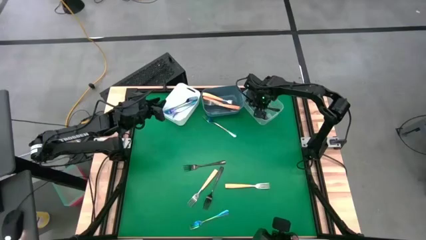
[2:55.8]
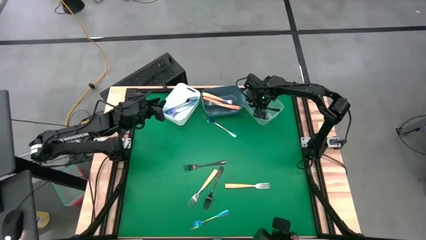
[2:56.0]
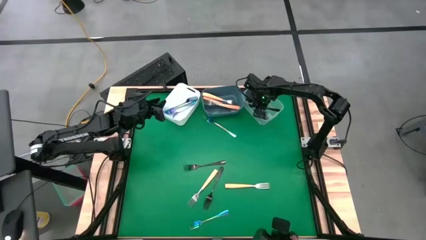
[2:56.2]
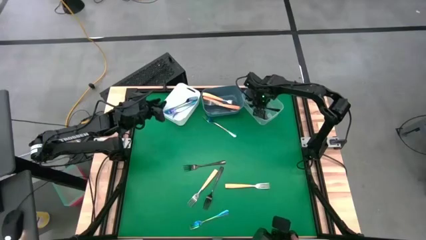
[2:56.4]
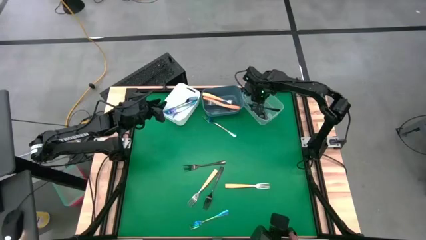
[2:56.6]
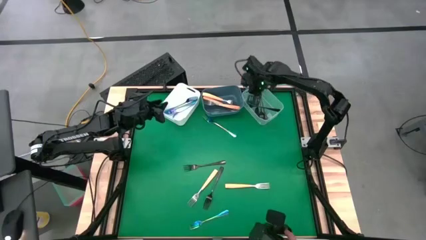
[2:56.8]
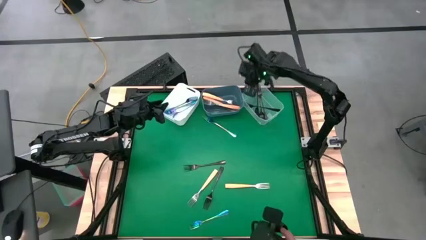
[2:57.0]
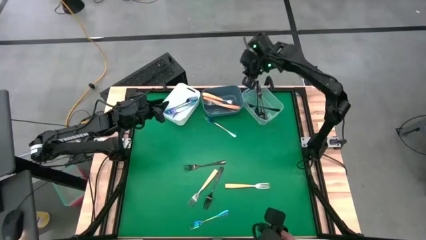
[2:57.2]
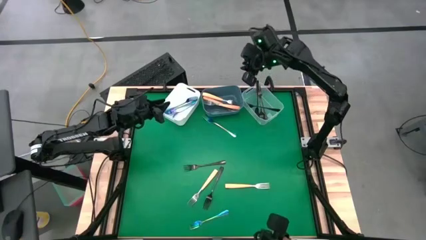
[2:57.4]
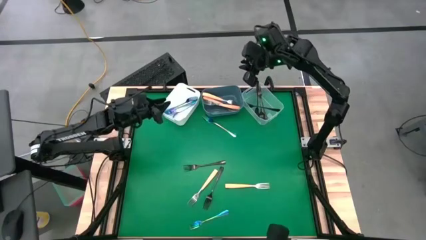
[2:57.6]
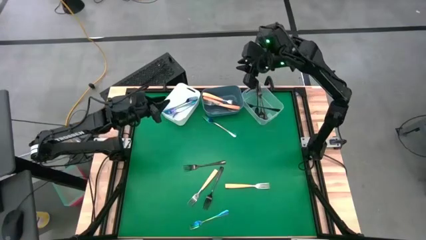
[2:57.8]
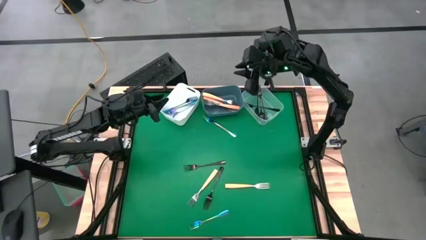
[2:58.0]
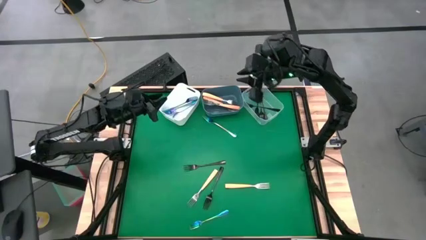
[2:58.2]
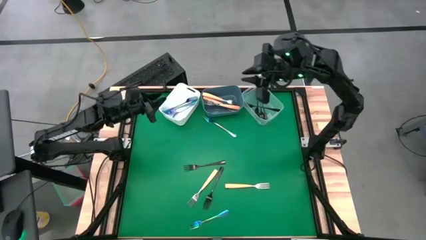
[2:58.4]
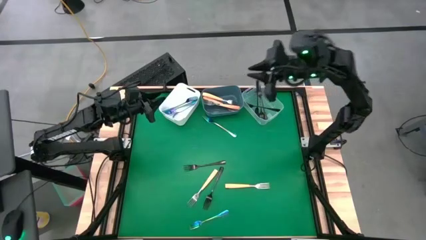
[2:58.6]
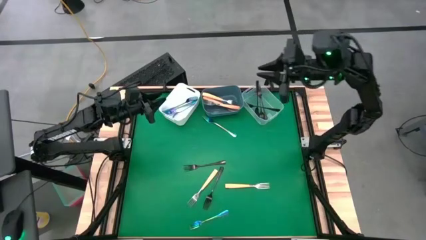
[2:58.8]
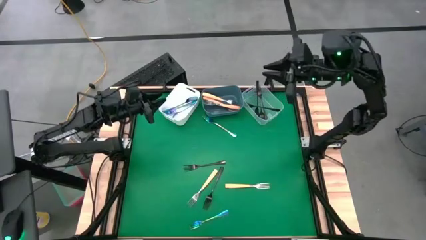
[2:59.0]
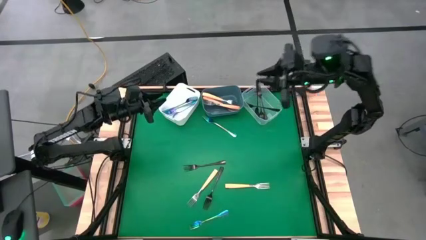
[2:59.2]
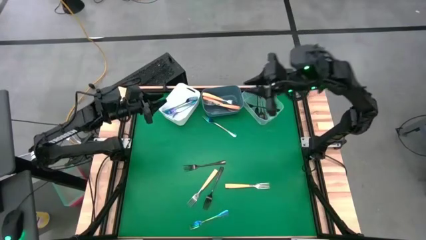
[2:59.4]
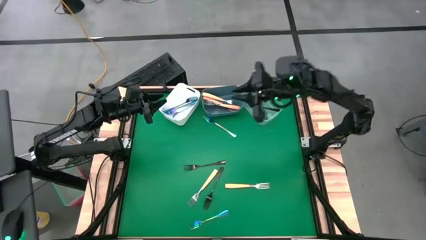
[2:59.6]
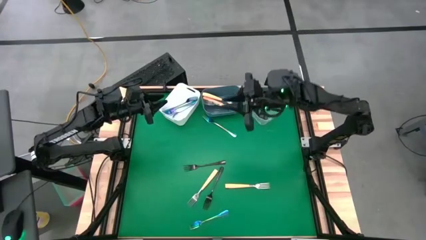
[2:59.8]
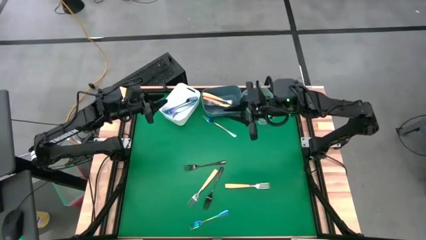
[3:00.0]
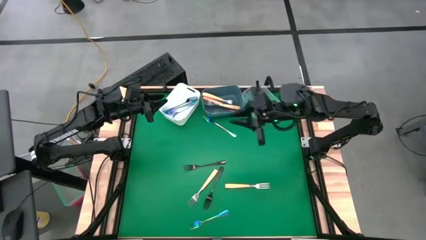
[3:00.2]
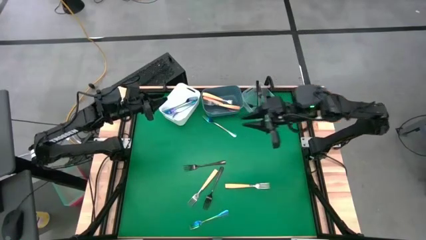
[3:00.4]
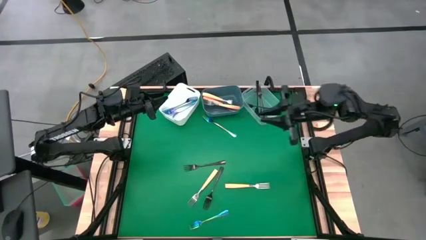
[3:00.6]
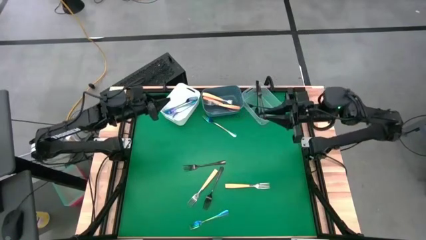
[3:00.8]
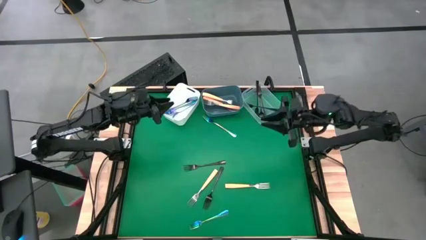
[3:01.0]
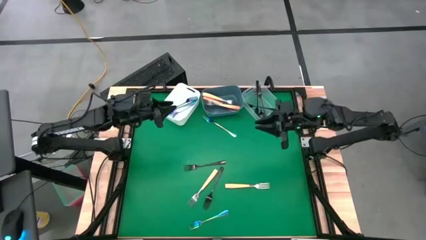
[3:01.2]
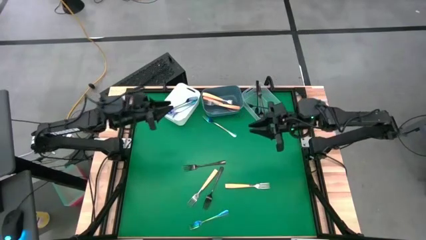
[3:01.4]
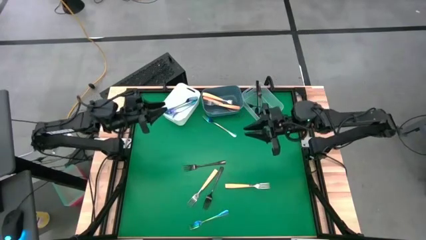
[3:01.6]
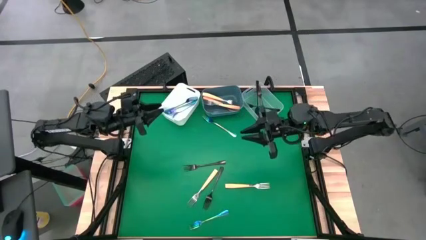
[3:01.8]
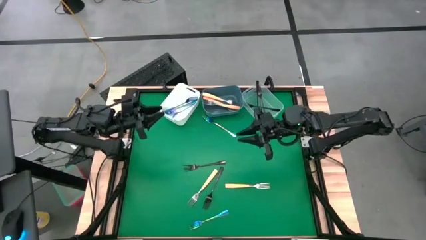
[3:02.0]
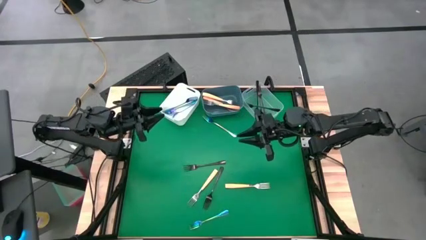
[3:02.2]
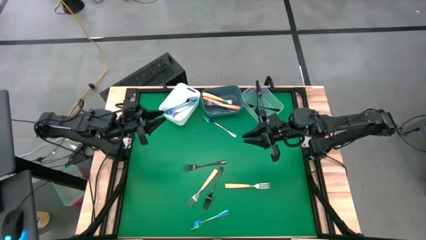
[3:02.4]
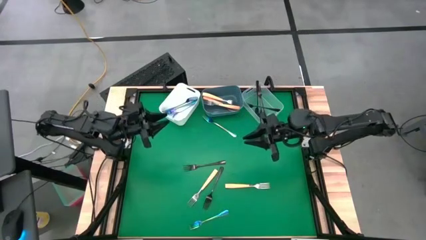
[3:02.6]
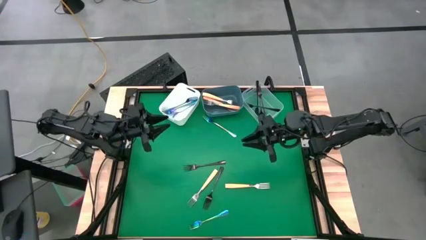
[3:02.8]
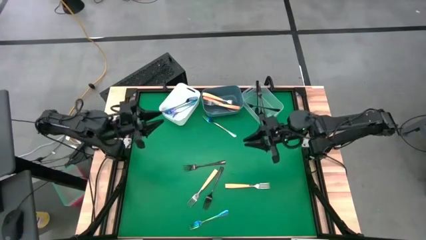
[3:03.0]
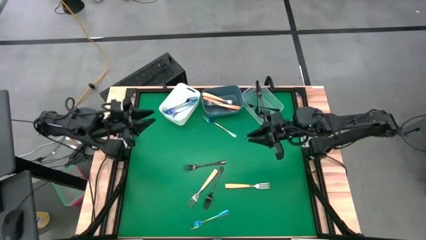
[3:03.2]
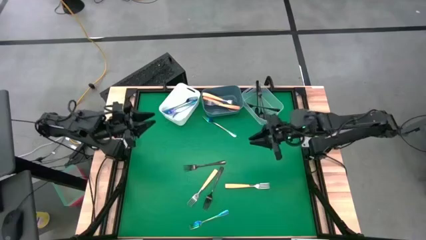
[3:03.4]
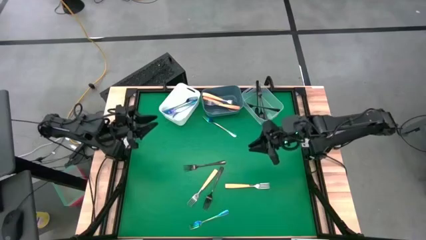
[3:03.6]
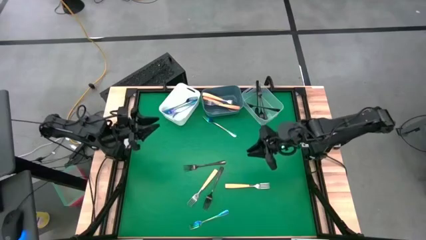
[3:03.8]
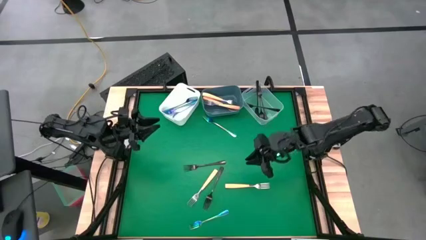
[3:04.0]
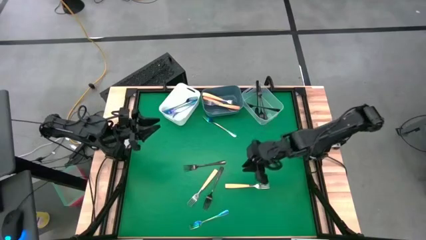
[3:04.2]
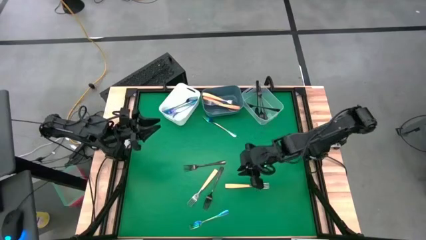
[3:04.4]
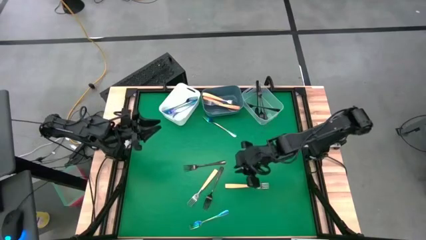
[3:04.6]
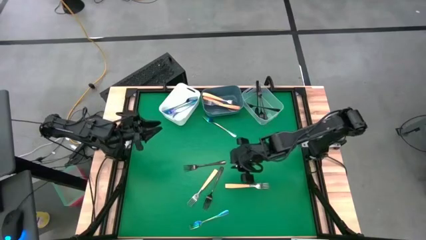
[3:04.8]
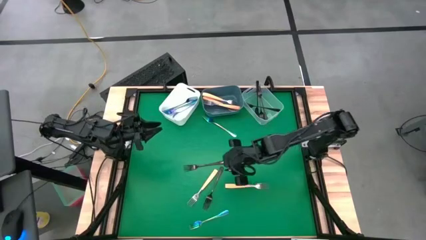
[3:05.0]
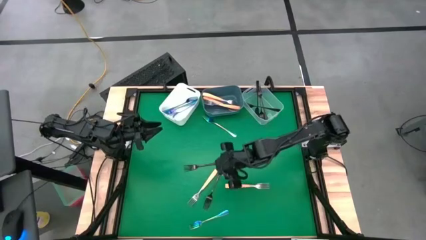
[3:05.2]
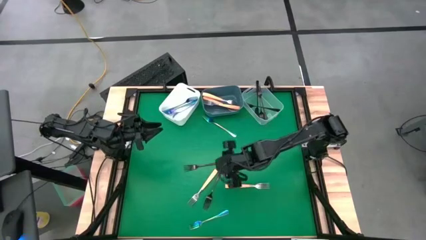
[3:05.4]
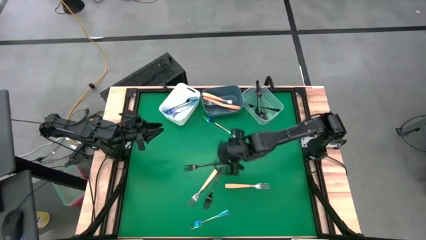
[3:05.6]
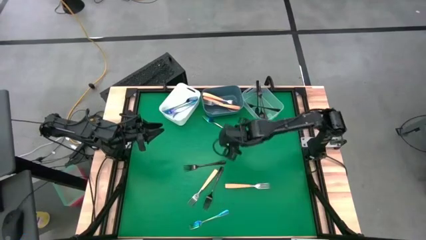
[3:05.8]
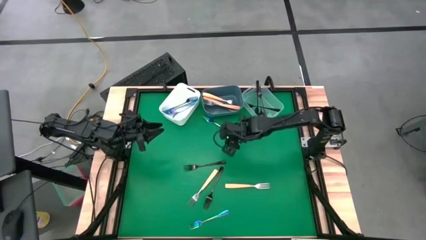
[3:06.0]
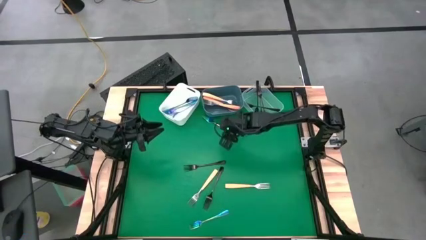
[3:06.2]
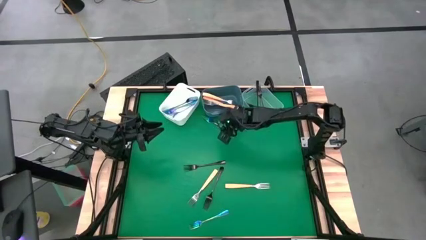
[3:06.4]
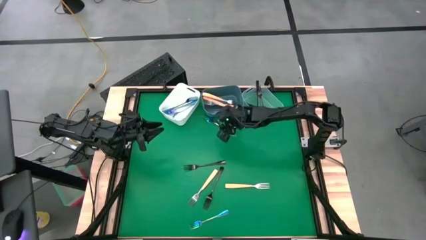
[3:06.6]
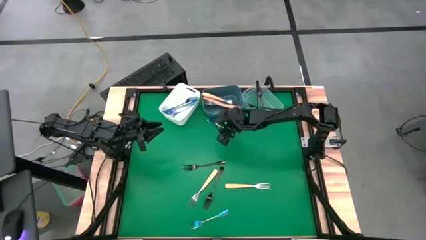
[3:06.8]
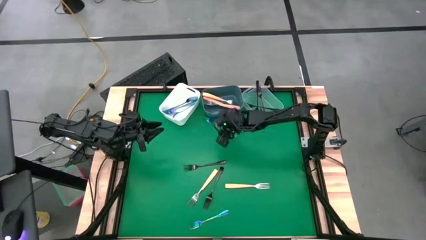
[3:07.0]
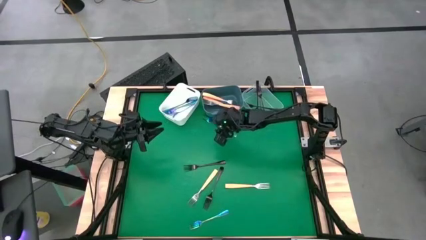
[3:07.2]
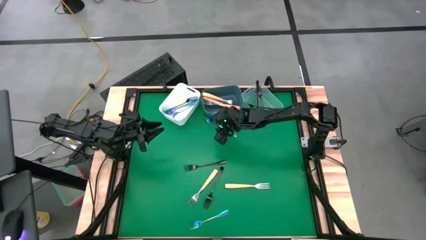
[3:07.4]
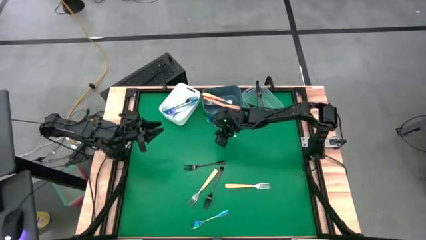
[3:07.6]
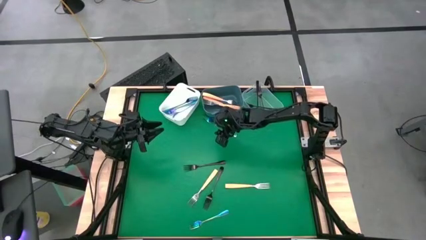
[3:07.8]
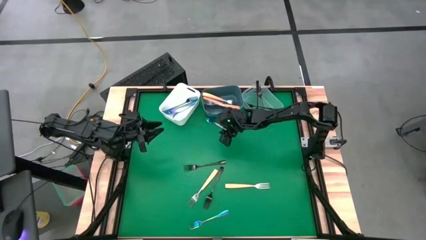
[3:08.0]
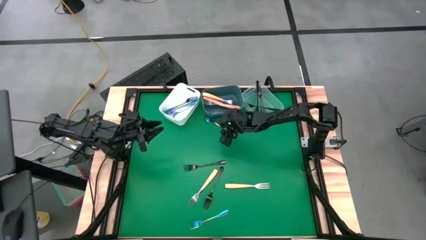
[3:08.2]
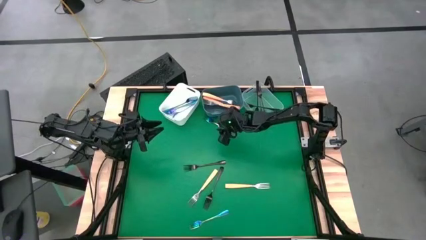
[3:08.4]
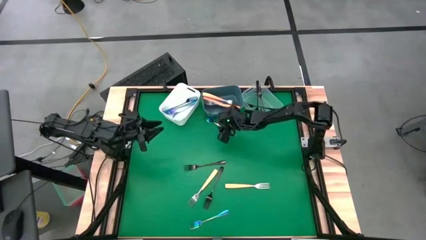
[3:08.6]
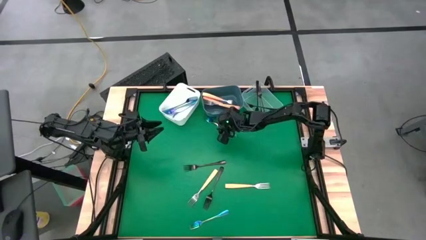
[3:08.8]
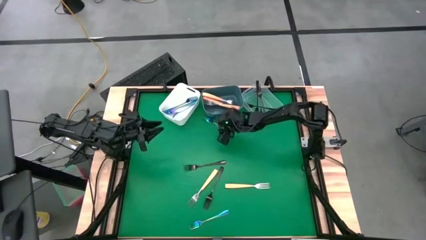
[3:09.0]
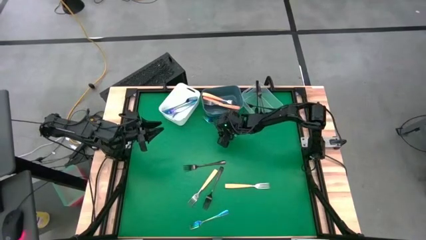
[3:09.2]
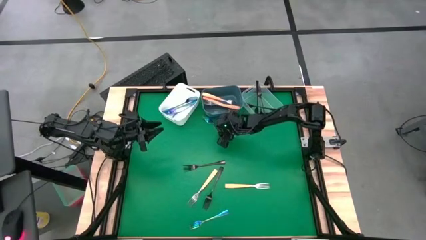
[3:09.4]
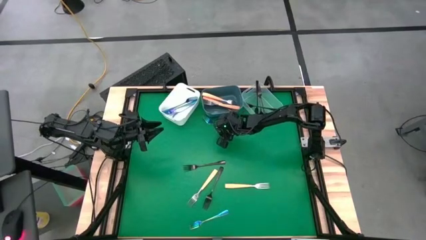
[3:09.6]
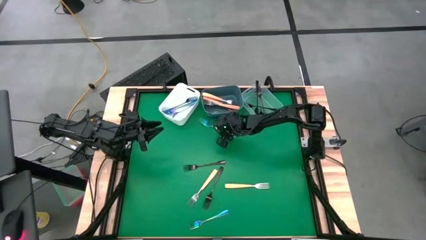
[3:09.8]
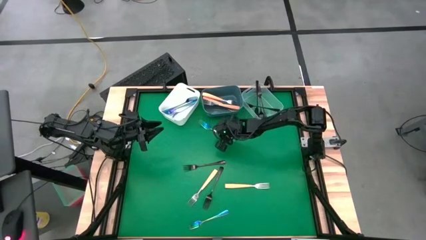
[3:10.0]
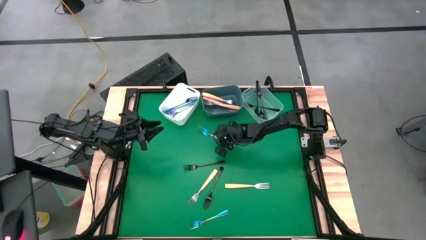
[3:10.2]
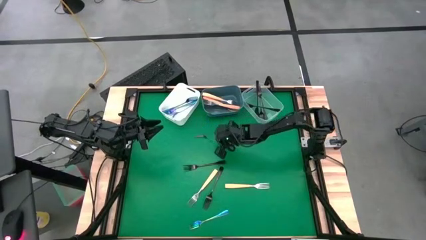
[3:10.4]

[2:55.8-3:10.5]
Task: Sort silverware by color (type)
Put the blue fork into the white bin

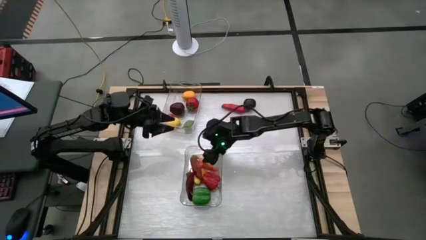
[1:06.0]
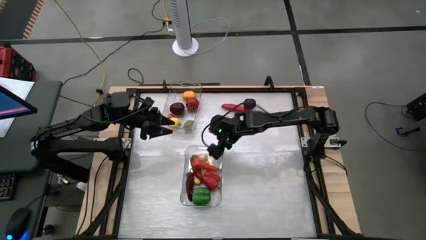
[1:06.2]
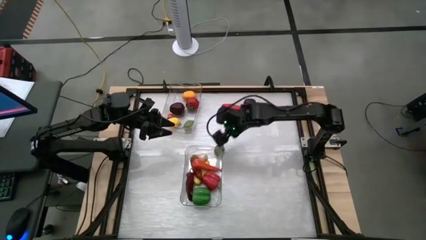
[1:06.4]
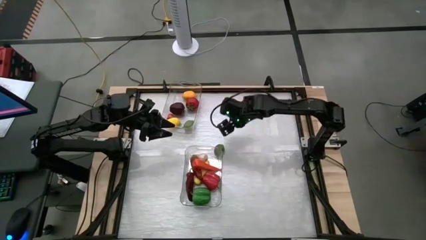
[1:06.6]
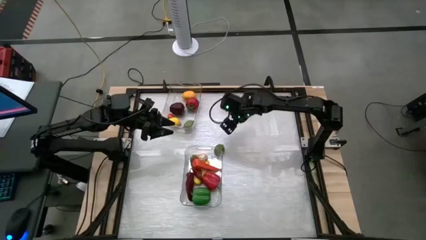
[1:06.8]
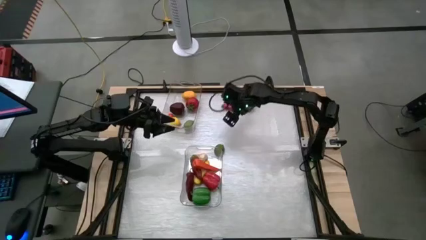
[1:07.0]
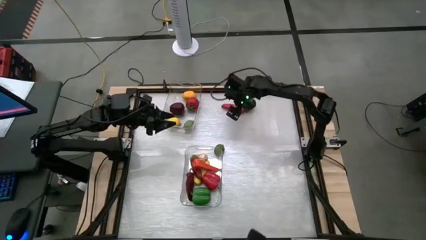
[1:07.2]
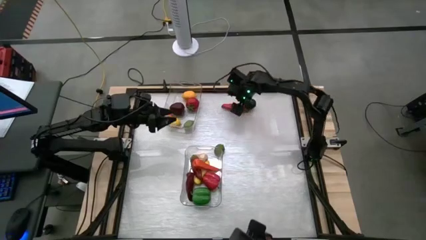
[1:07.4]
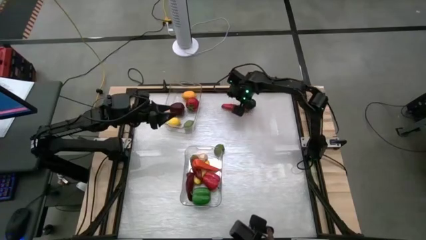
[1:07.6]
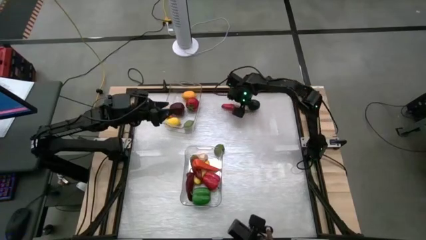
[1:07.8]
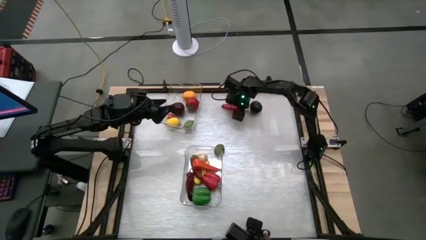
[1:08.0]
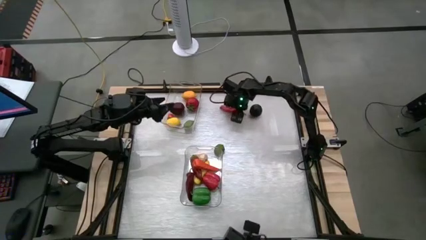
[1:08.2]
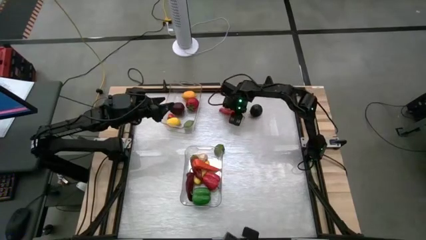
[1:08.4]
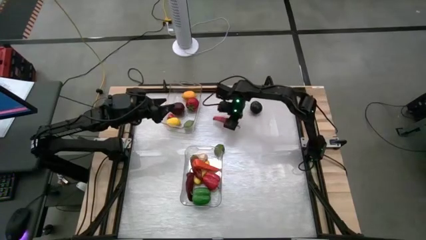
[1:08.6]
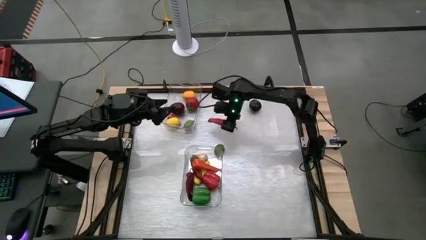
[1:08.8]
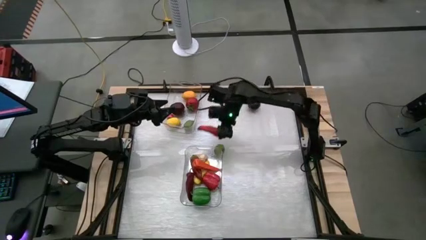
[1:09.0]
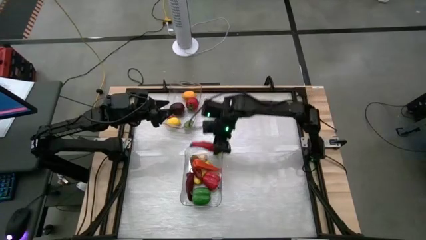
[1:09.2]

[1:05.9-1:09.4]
Task: Sort produce into baskets
Put the red chilli pepper into the bottom transparent bin
